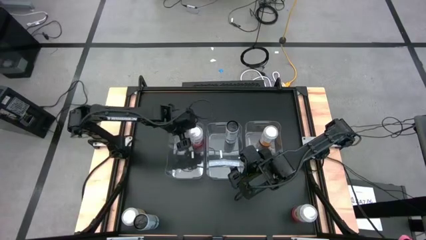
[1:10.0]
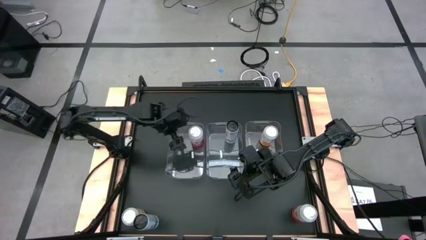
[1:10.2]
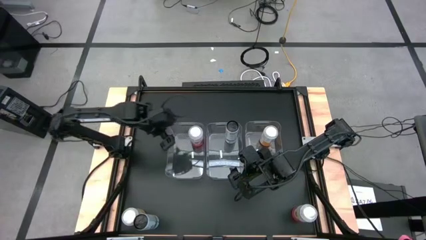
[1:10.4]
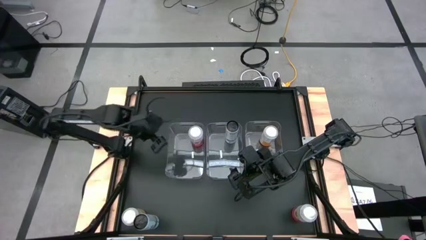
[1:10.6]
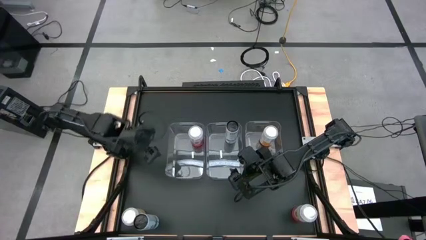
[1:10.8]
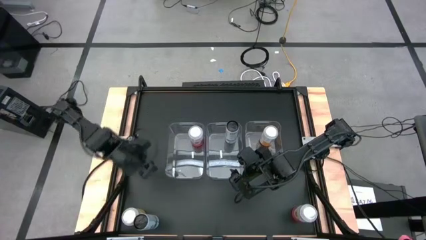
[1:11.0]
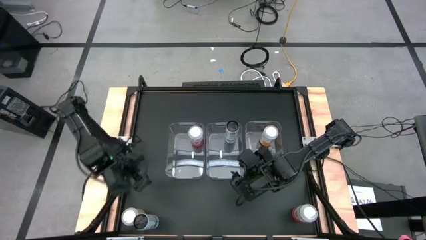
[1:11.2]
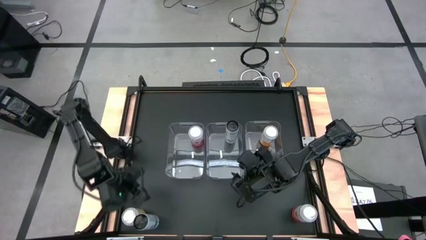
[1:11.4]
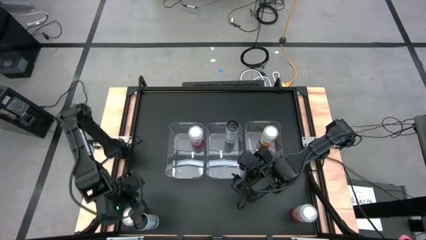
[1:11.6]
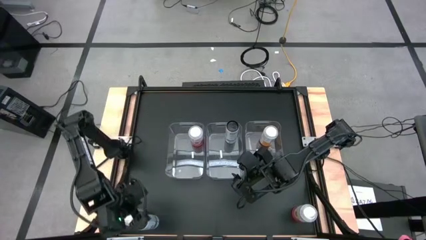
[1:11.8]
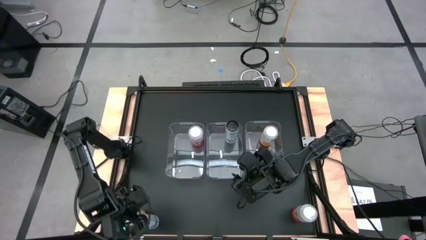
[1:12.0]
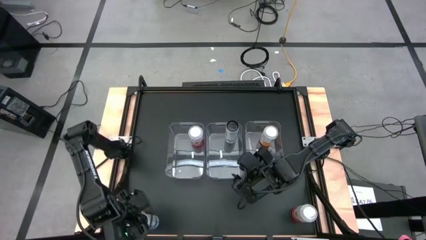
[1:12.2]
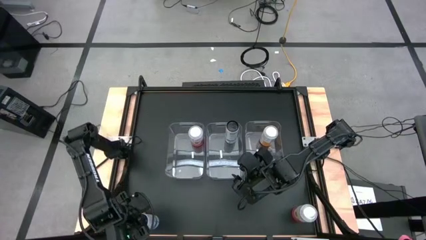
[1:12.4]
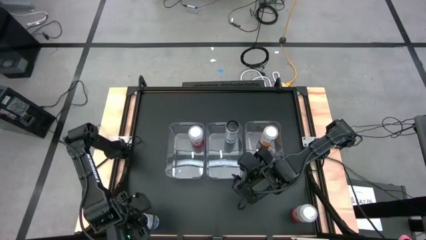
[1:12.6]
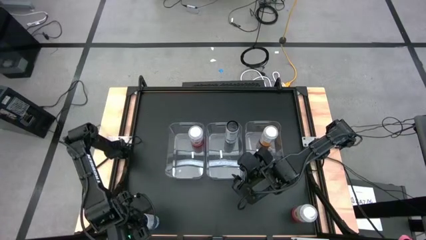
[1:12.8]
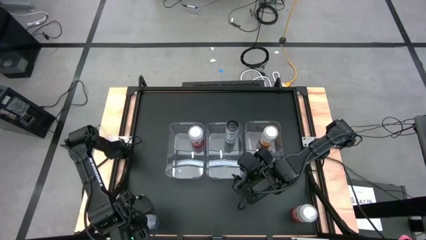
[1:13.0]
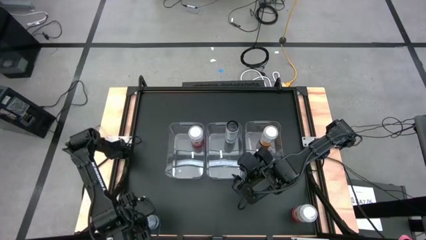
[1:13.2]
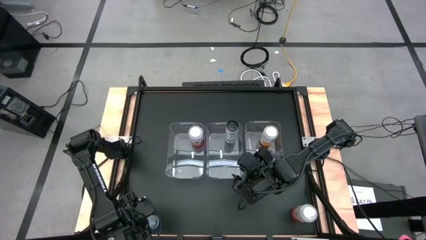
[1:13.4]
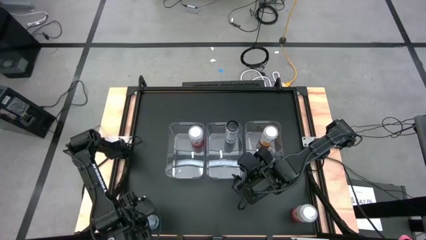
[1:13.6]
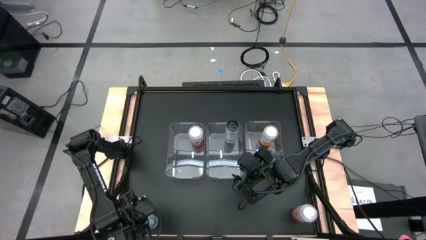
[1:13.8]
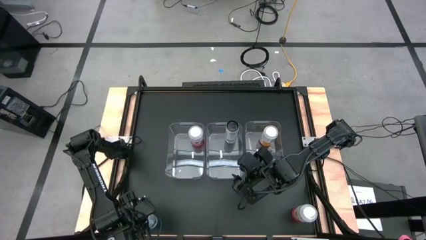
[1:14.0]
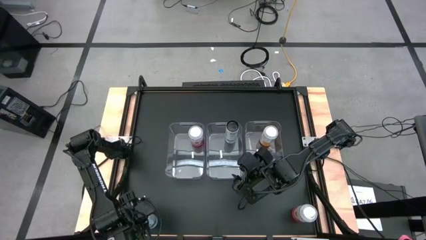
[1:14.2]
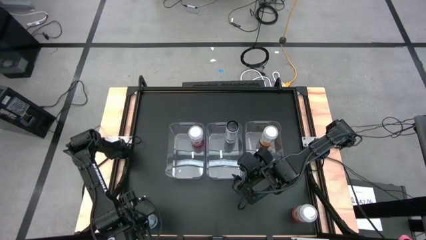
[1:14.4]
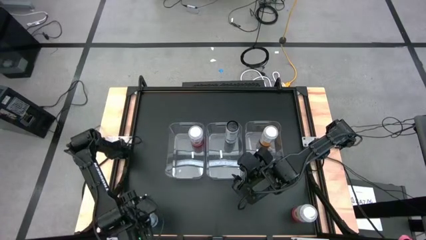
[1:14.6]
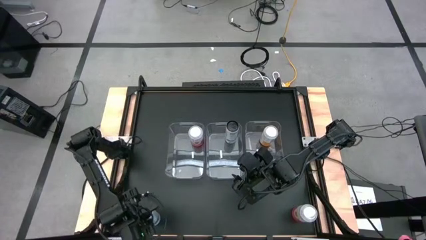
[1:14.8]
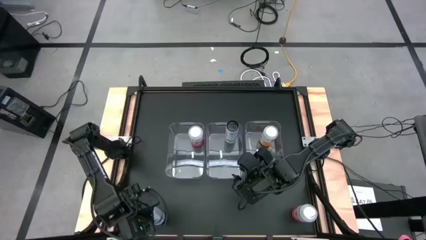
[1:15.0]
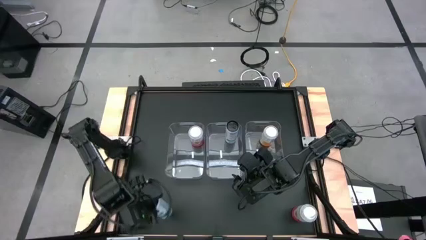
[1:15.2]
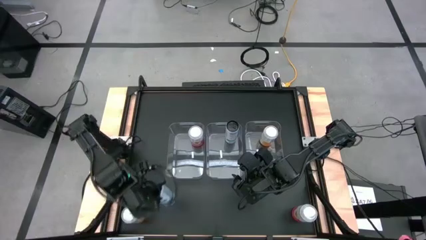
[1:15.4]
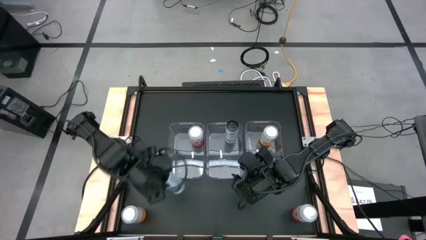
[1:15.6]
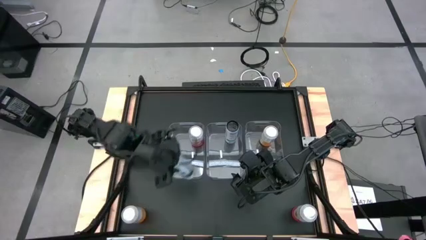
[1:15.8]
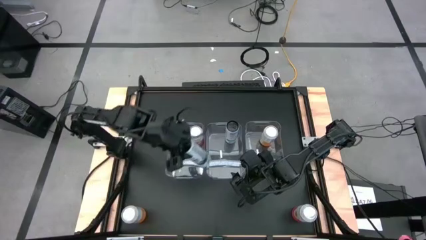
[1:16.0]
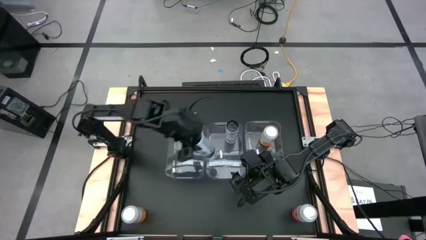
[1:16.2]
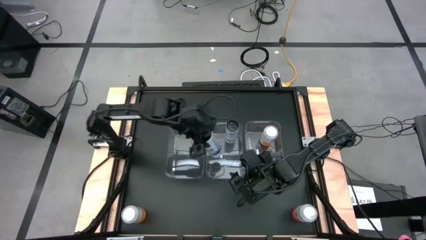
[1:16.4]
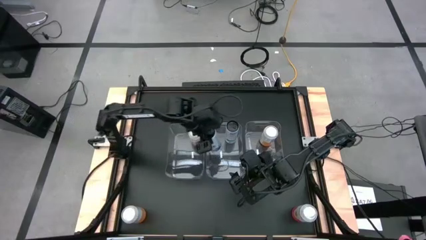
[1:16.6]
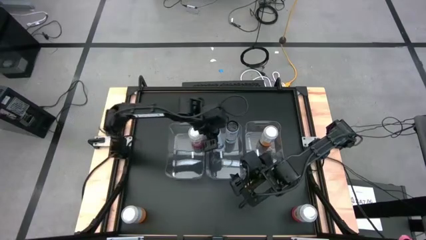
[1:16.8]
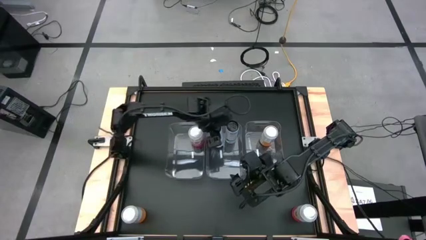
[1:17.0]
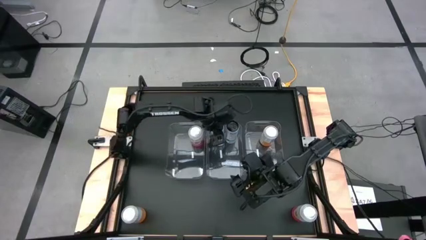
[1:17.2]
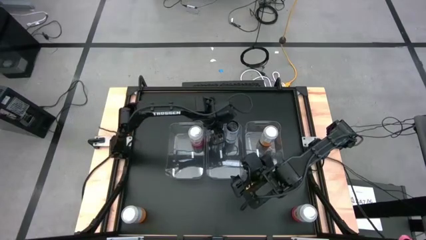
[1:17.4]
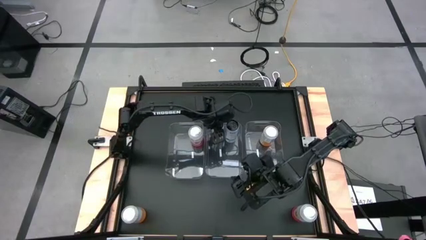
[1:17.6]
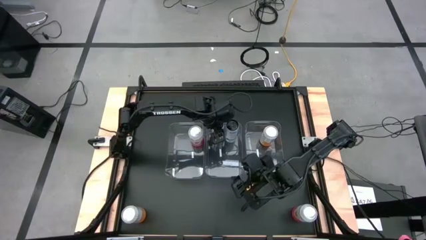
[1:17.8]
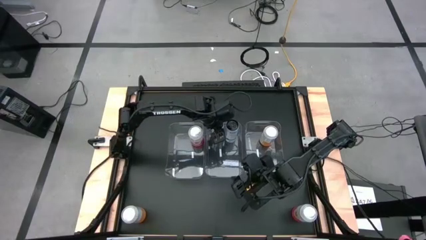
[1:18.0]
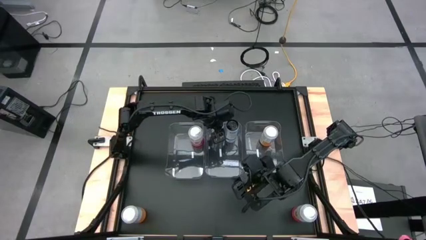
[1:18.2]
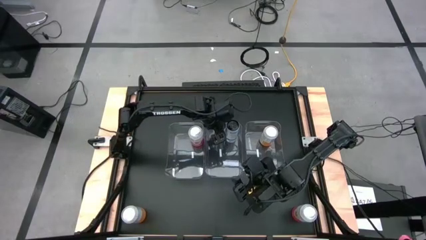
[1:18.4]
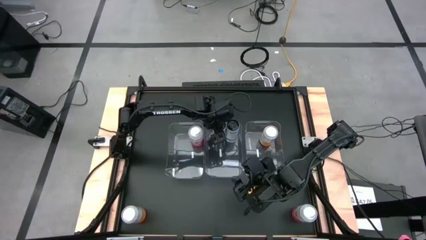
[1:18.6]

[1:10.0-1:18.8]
Task: Sort soda cans
Put the white-blue soda can into the center transparent bin

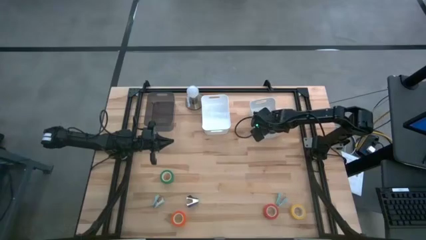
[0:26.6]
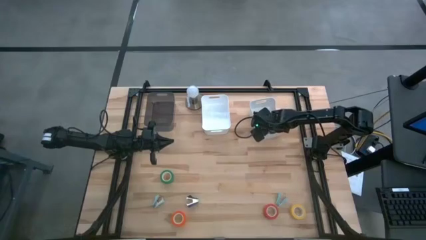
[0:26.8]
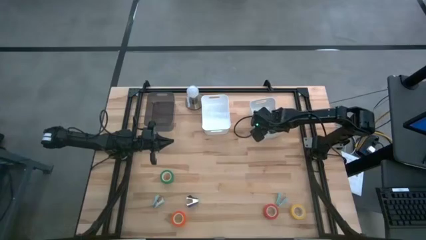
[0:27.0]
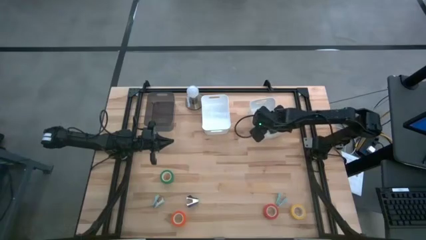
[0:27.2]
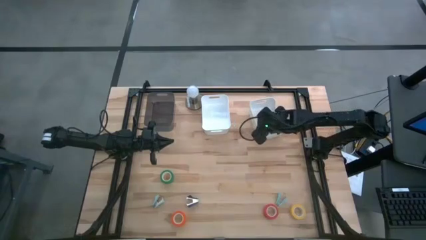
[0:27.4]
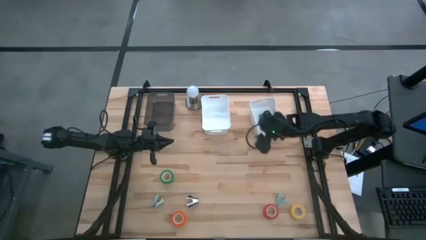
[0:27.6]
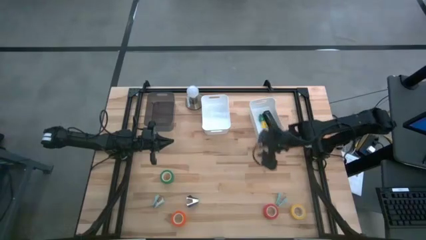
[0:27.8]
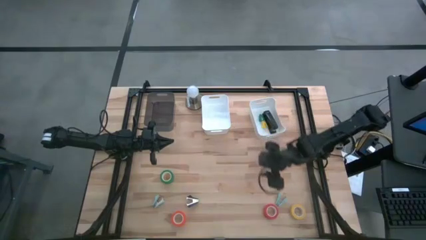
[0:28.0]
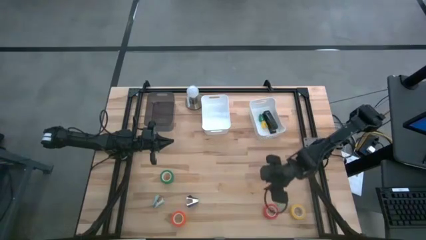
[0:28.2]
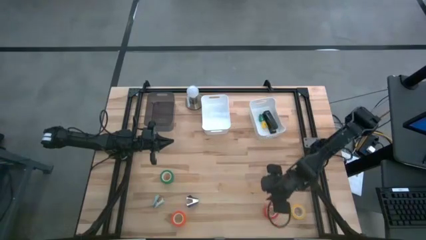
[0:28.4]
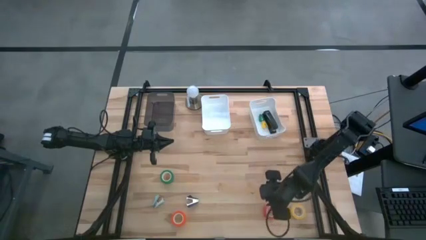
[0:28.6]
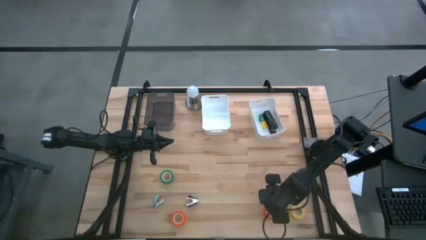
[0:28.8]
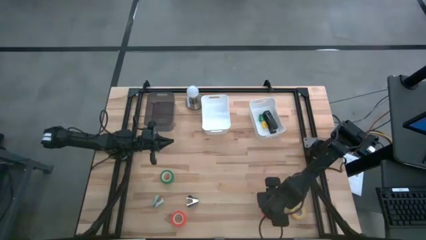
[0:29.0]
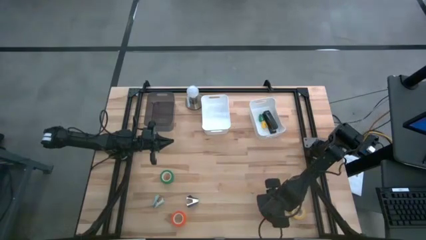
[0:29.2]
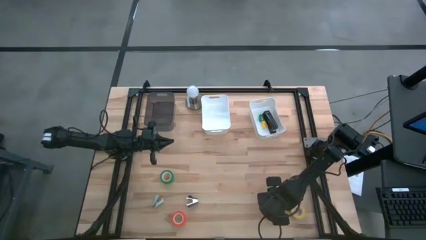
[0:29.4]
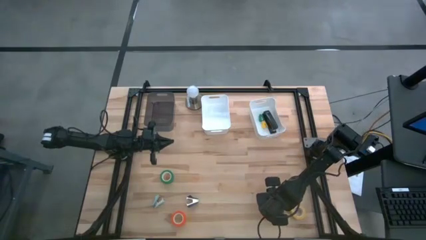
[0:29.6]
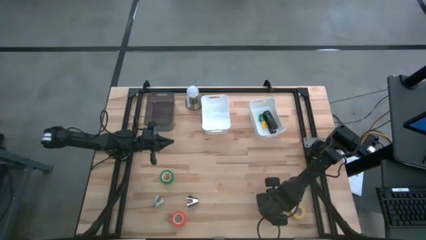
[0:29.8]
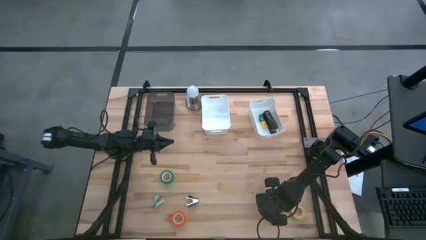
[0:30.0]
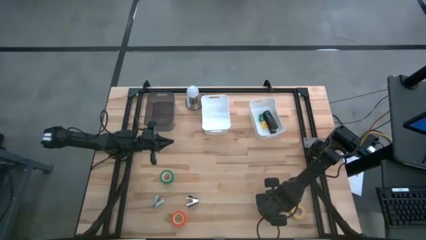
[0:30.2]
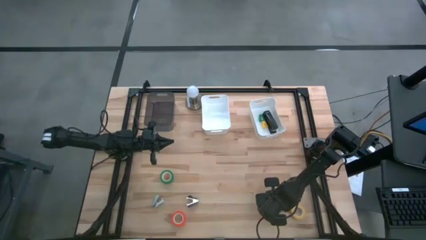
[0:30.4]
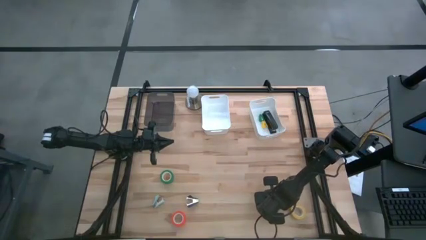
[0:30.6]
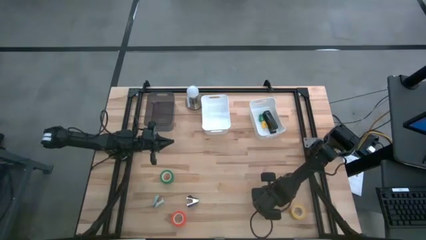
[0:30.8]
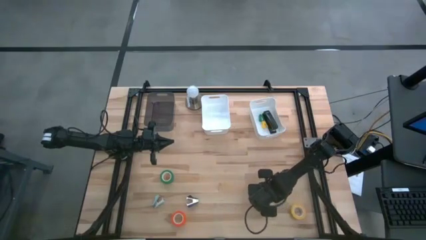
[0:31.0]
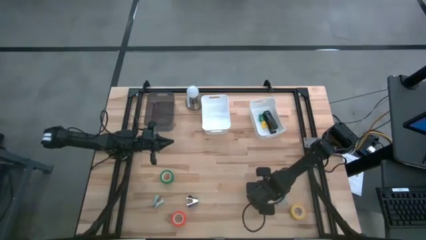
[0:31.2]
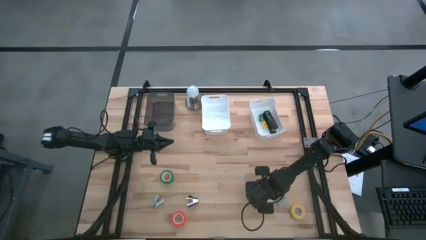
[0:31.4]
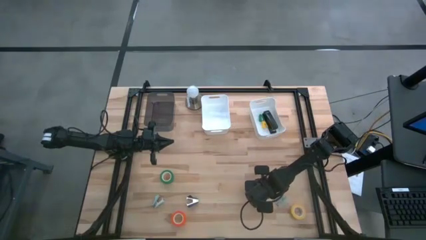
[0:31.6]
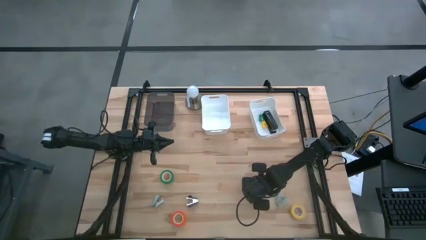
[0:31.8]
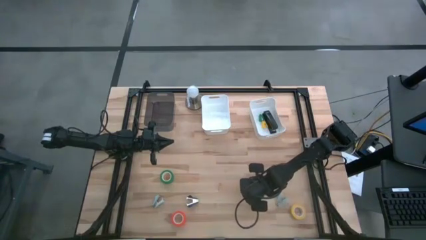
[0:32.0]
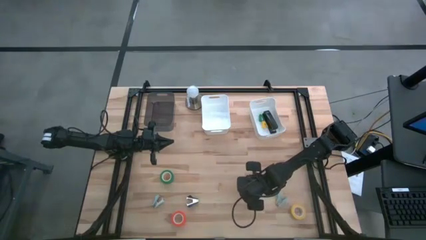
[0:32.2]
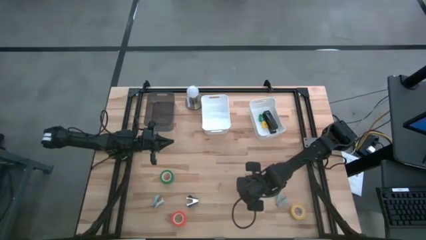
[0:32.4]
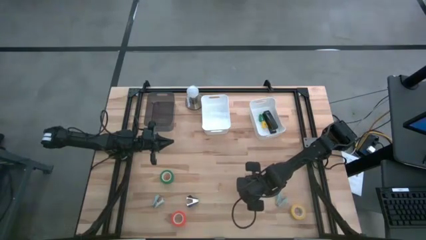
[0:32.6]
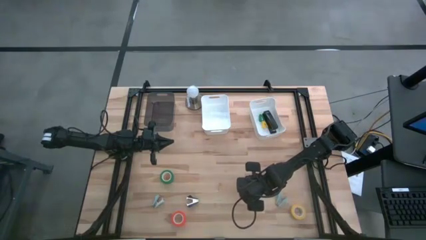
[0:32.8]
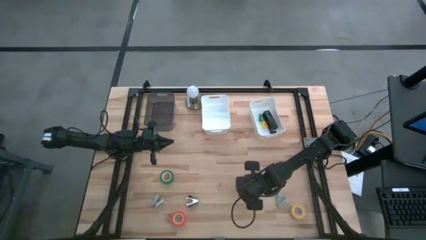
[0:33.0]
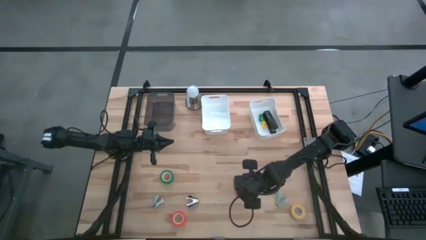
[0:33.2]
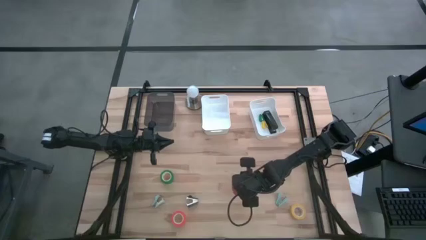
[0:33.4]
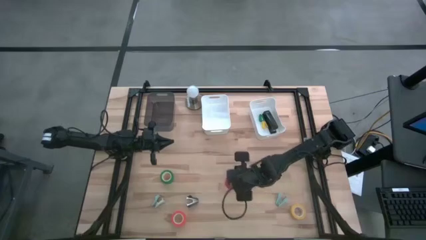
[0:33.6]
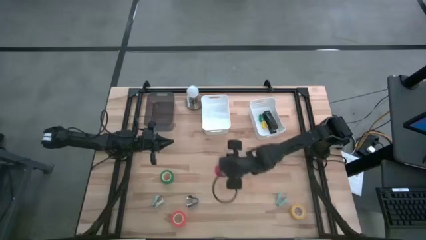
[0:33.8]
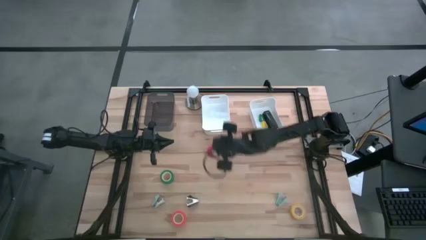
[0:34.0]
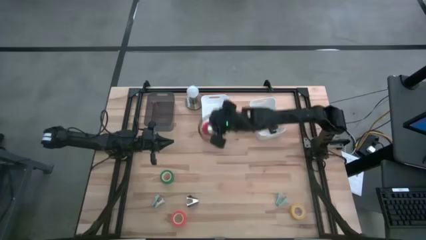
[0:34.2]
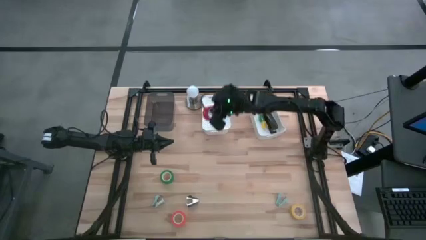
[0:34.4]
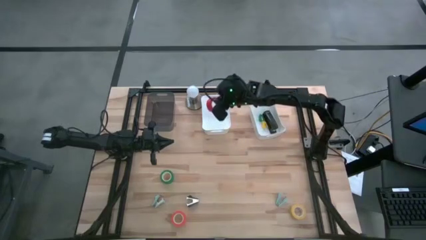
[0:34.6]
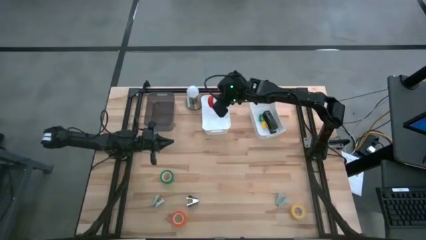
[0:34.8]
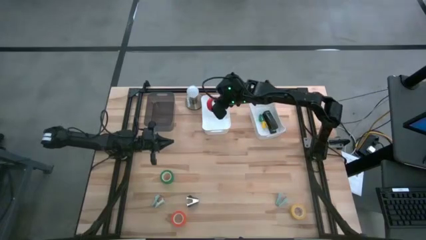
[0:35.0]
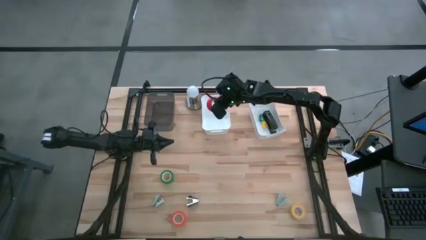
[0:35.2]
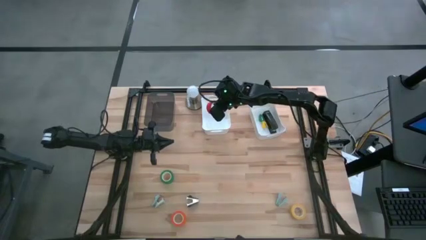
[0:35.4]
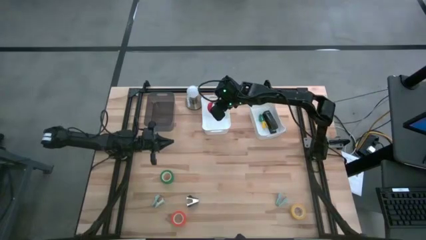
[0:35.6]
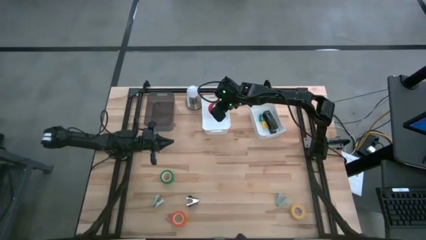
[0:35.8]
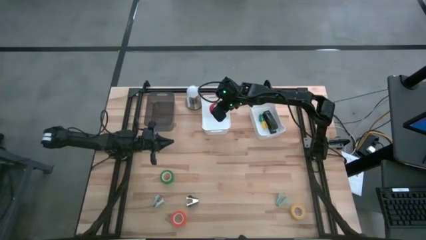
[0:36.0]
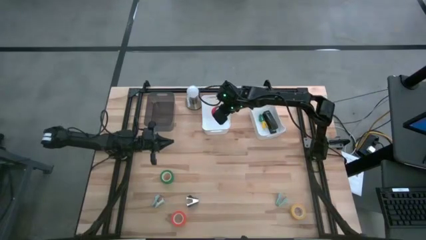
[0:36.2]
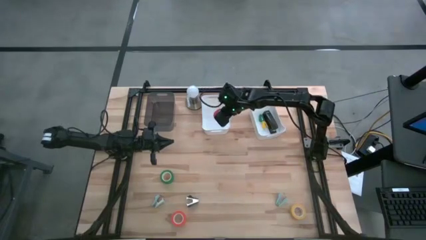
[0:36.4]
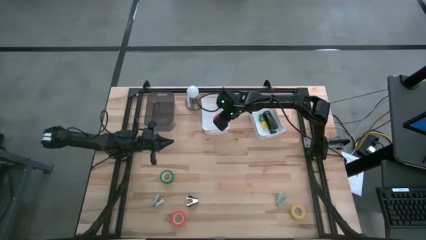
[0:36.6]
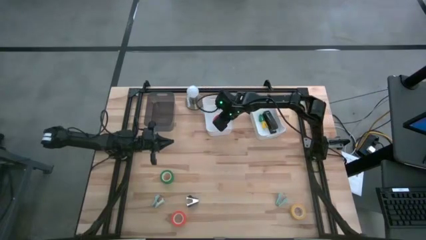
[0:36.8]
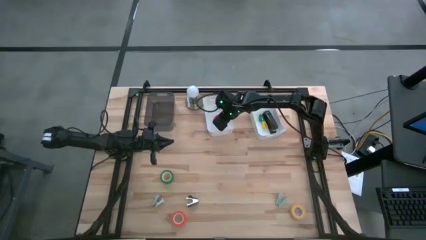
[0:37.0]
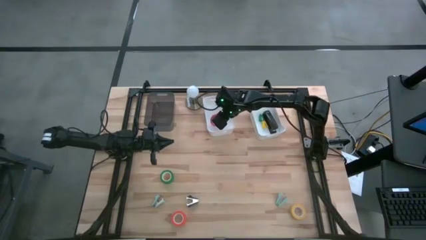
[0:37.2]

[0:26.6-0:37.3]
Task: Pick and place Stapler, Stapler remover, tape
Put the red masking tape into the left white bin
